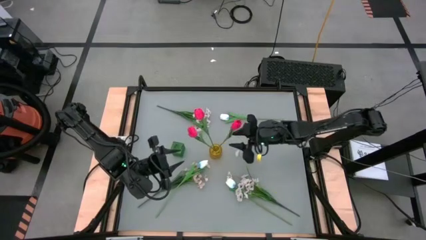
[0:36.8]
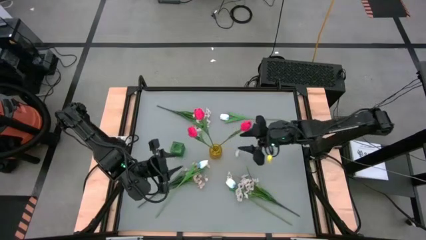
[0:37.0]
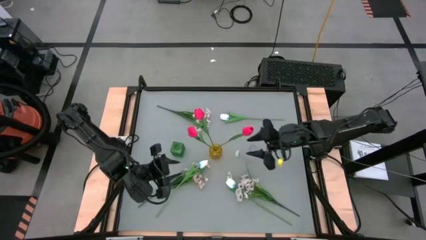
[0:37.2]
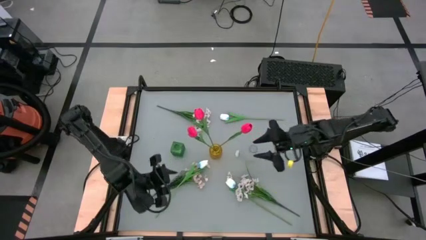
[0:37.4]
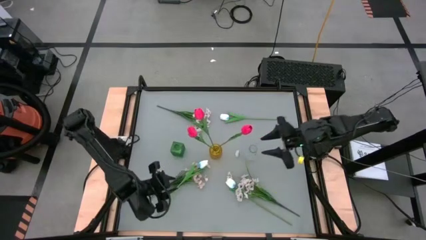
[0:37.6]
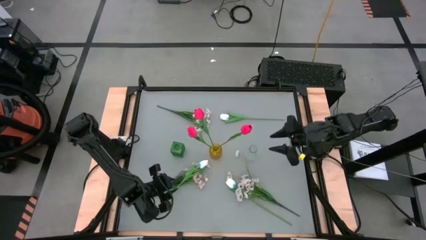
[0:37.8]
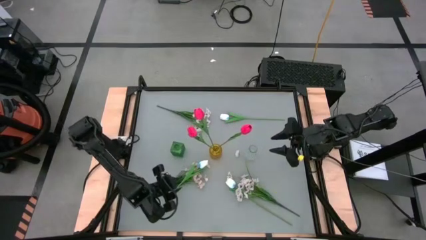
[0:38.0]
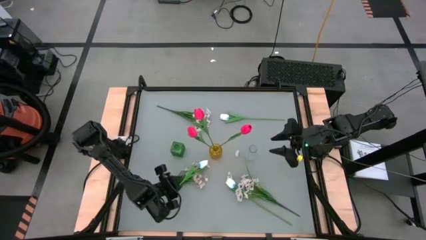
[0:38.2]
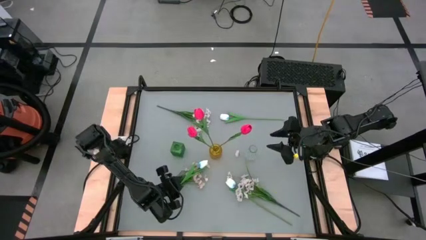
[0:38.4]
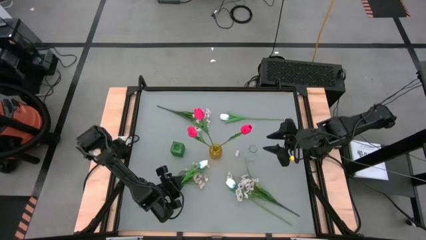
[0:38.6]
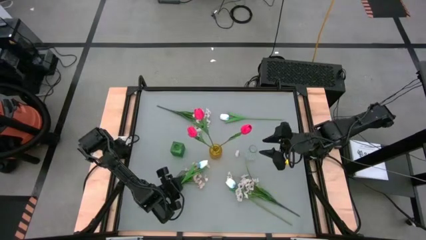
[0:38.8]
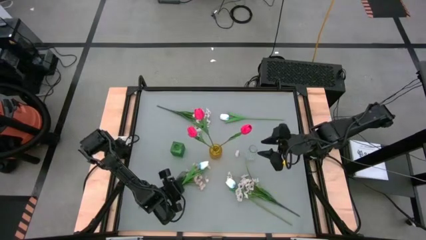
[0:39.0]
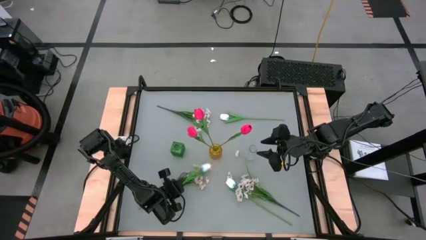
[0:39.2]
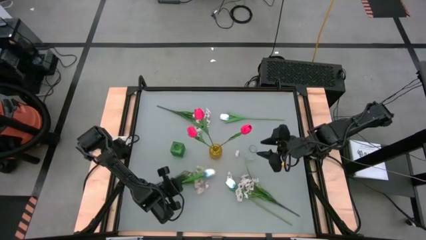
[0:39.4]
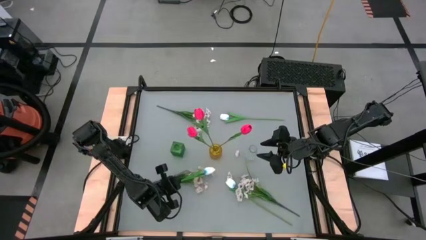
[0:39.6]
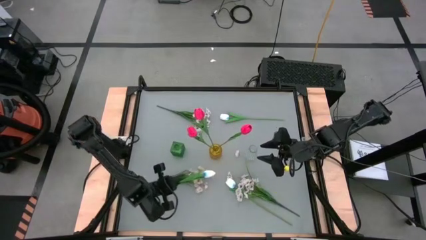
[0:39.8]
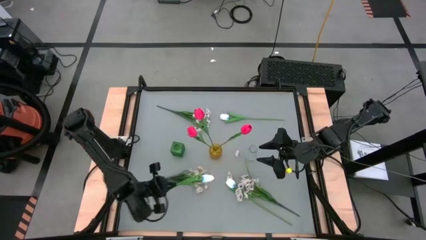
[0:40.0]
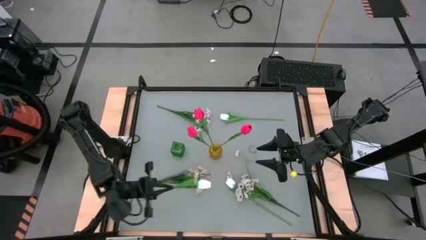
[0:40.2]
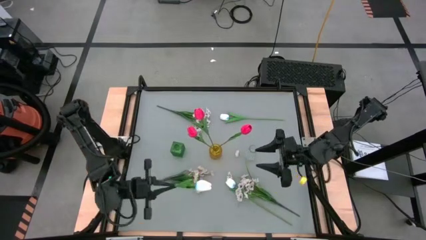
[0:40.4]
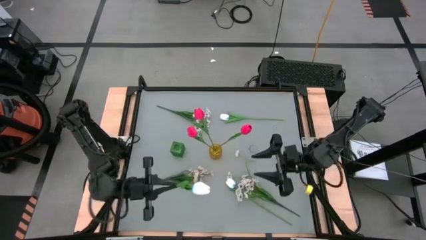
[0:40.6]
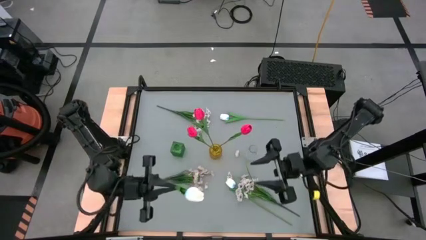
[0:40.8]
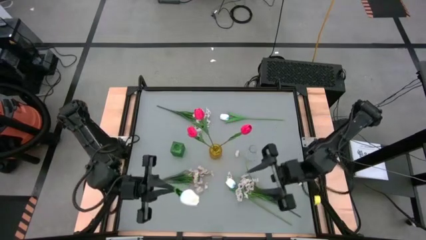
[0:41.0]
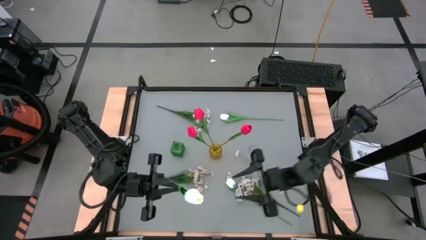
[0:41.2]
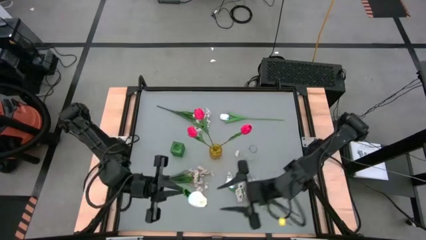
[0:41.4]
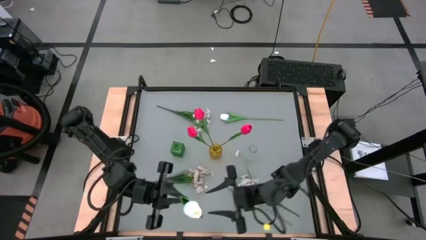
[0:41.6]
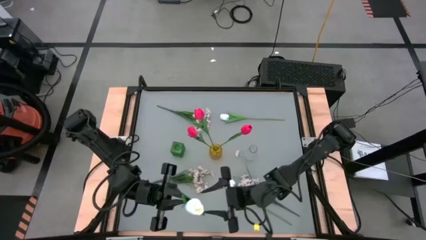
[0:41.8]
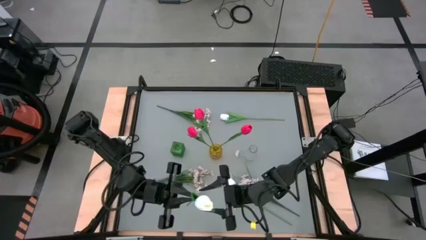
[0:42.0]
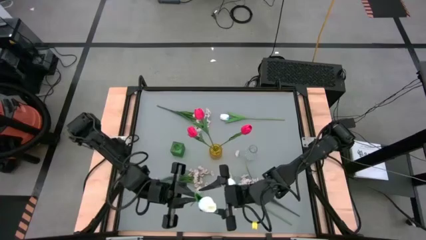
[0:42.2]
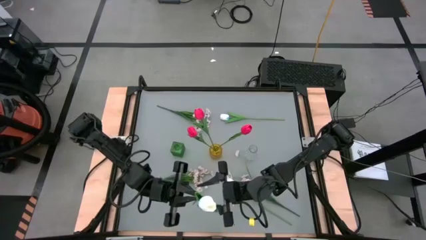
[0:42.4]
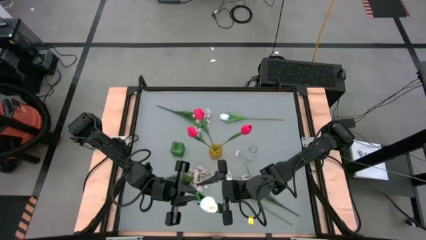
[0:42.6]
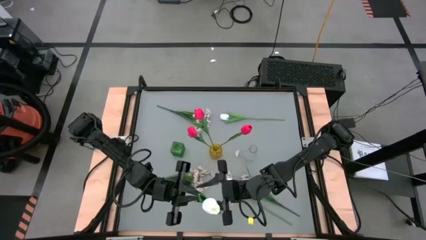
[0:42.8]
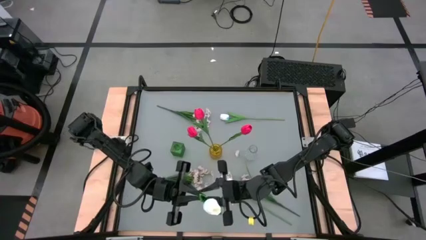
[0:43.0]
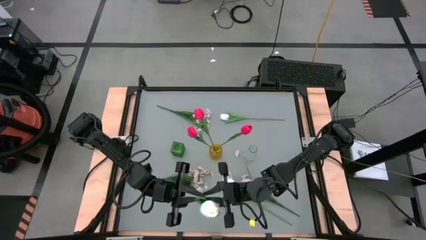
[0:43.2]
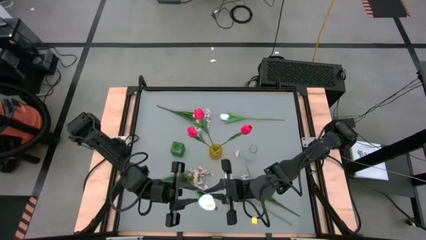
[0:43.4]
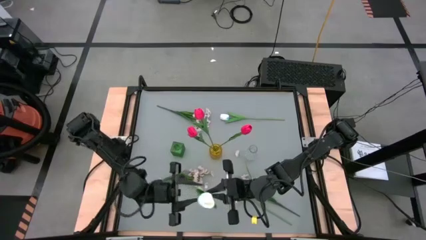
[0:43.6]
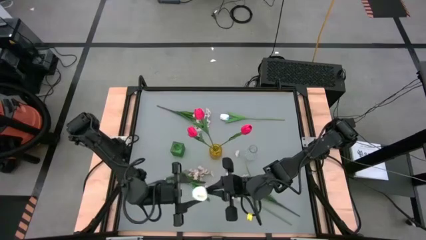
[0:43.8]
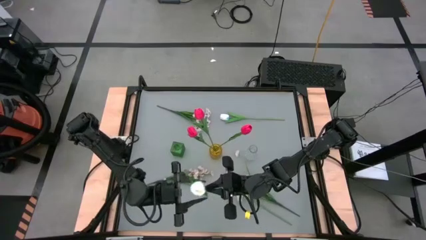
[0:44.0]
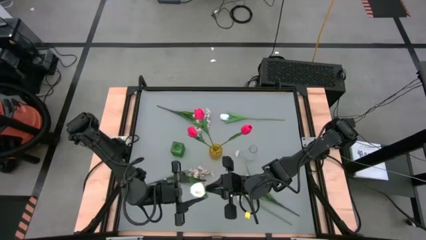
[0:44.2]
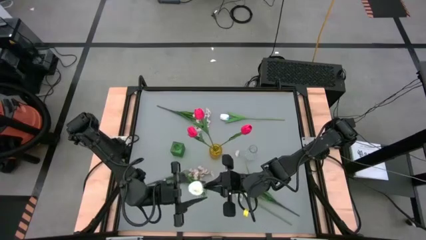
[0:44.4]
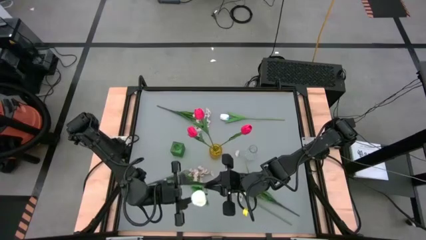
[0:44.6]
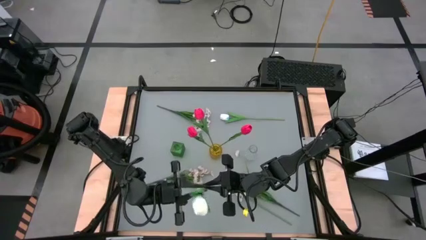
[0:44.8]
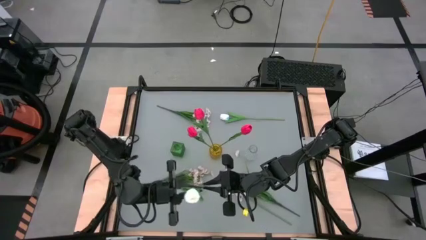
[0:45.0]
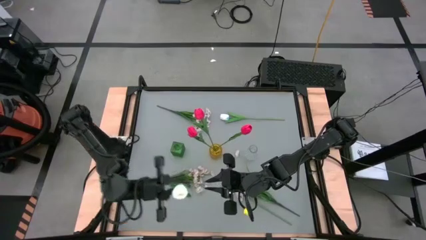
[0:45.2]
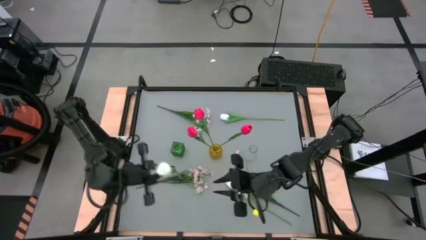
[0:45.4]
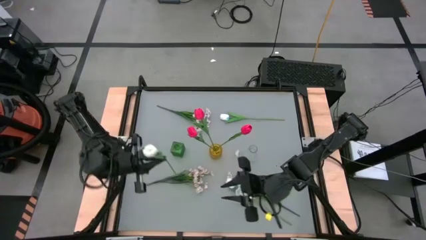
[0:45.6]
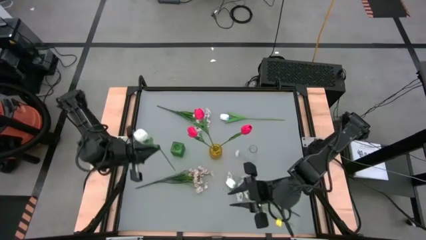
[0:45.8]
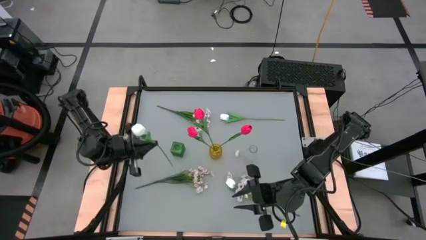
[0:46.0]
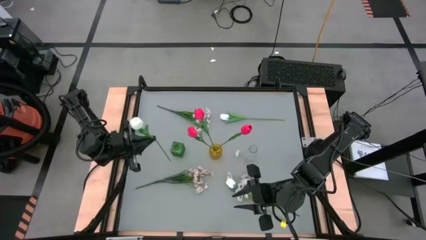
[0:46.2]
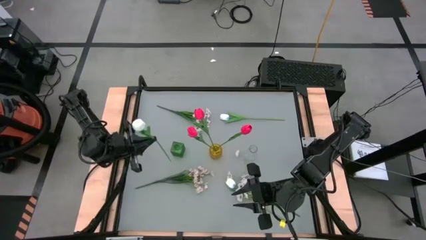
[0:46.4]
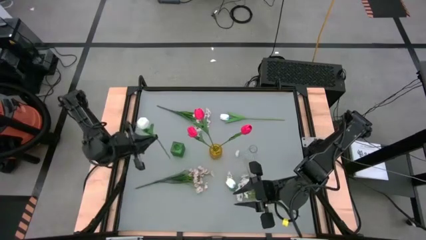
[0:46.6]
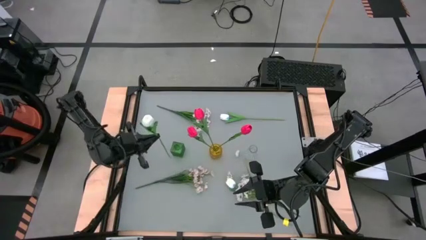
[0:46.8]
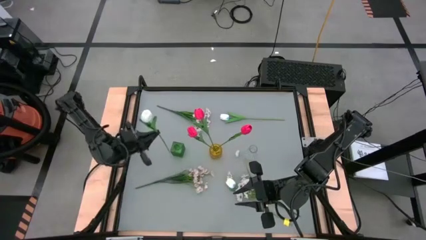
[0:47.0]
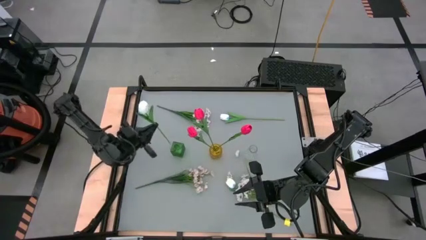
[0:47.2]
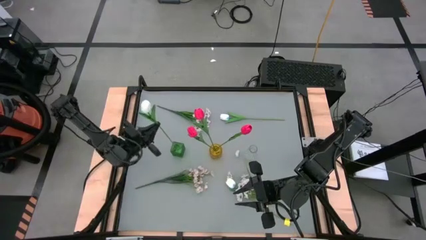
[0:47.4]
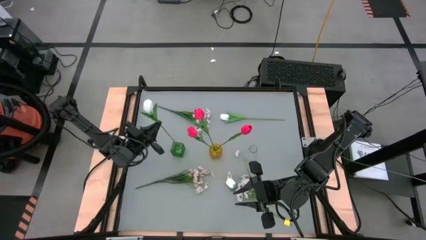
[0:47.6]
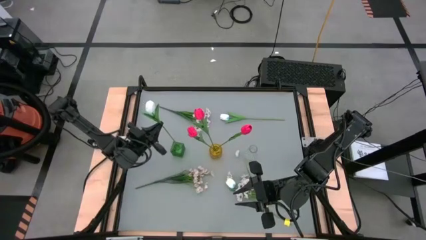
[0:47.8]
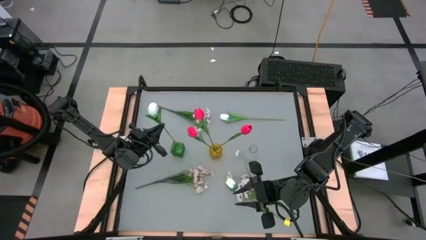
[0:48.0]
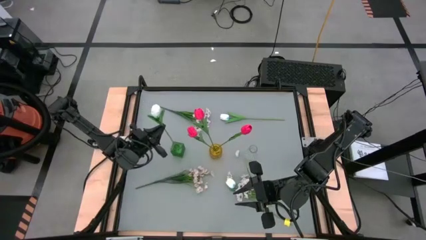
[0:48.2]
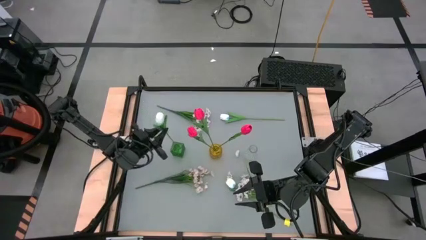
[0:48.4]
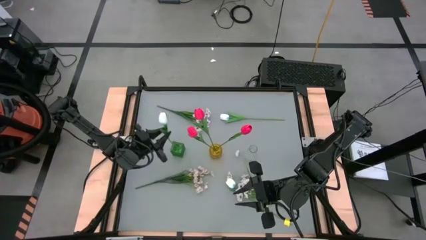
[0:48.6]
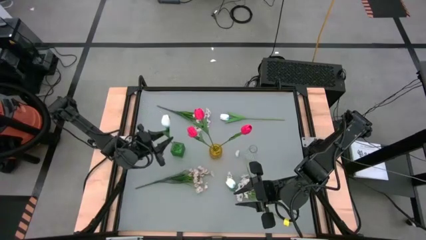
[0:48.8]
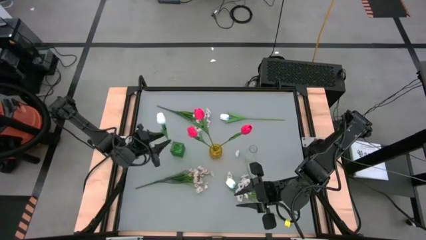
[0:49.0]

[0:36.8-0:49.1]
Task: Sort flowers into vase by color
Put the bottom left white flower into the green flower vase

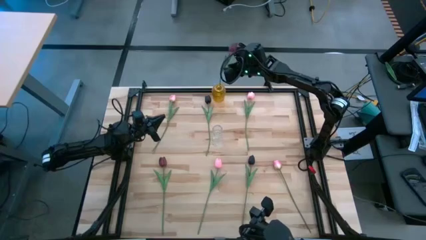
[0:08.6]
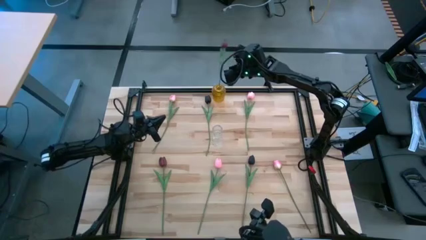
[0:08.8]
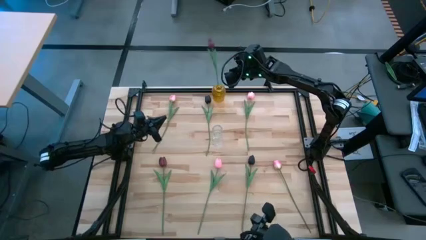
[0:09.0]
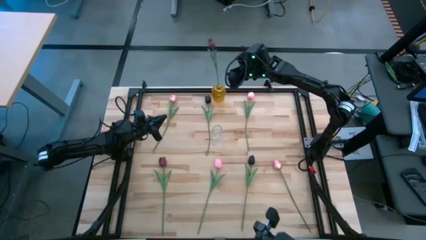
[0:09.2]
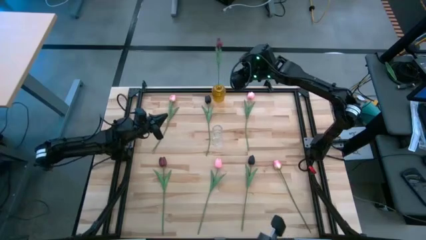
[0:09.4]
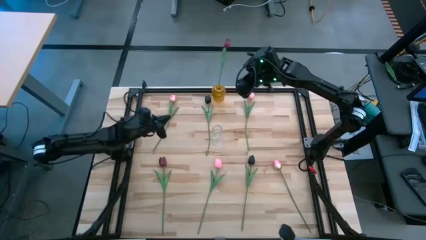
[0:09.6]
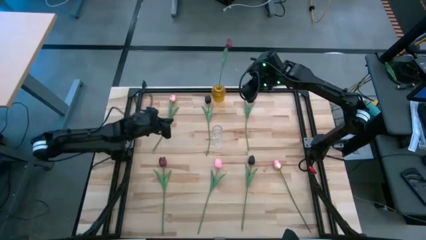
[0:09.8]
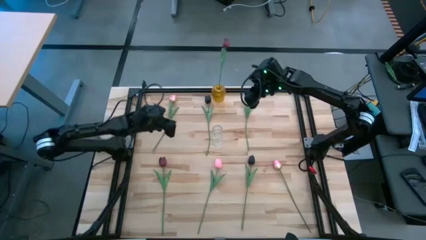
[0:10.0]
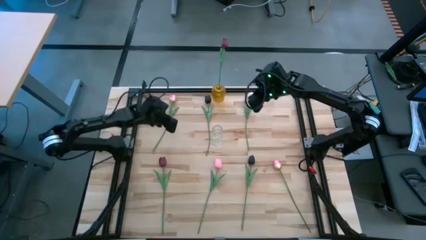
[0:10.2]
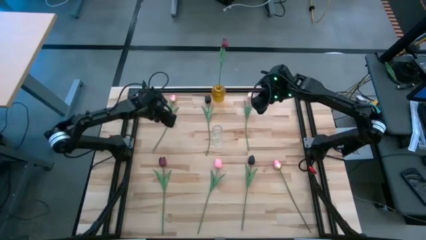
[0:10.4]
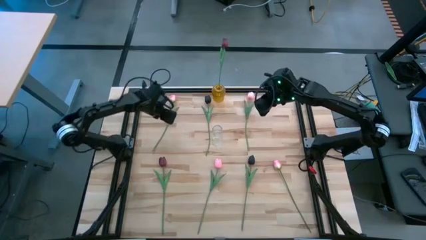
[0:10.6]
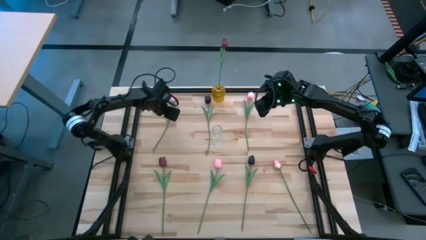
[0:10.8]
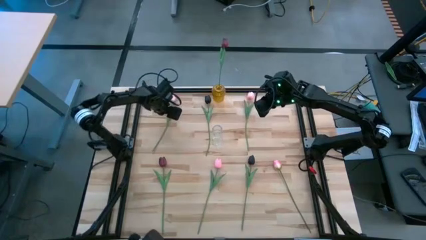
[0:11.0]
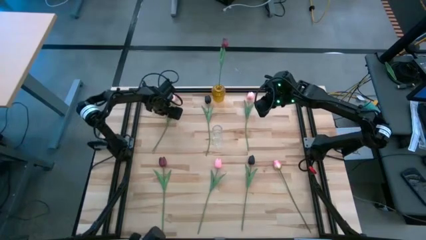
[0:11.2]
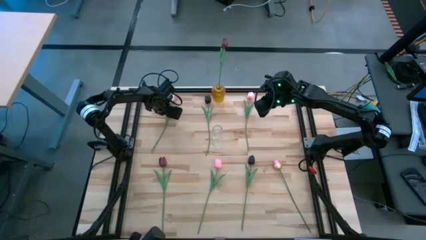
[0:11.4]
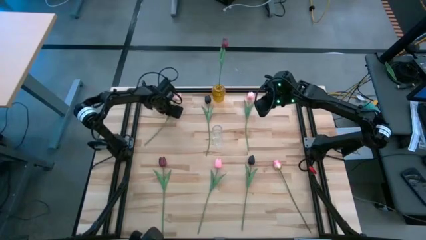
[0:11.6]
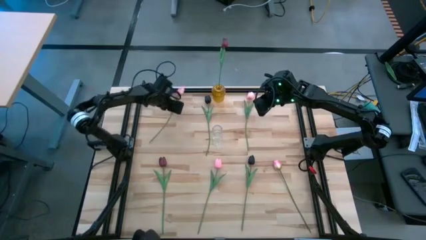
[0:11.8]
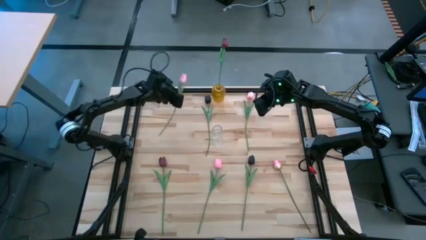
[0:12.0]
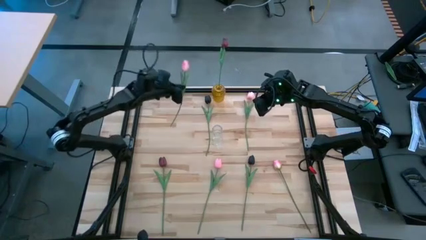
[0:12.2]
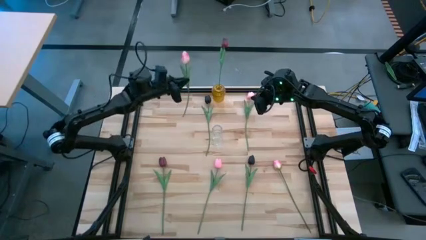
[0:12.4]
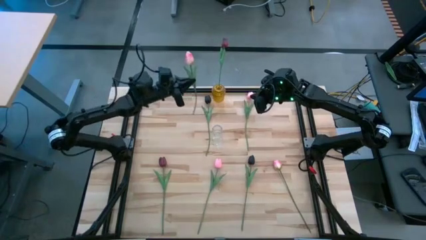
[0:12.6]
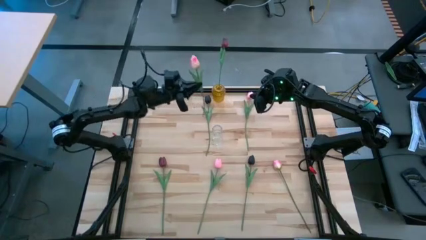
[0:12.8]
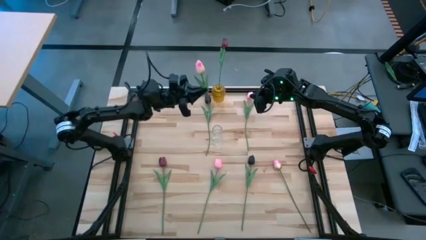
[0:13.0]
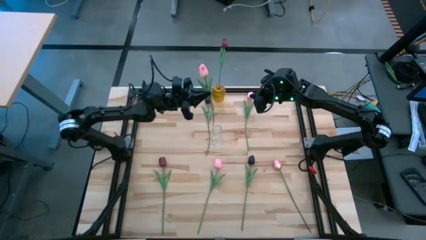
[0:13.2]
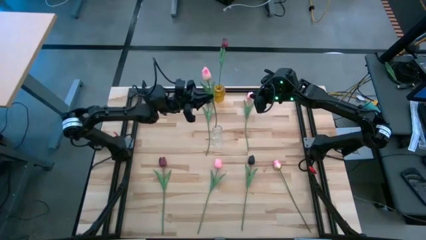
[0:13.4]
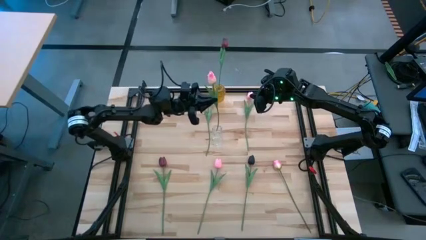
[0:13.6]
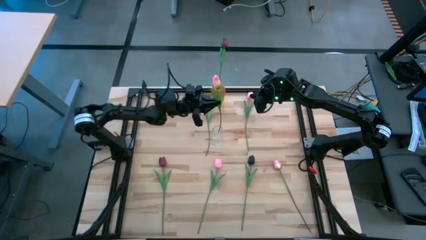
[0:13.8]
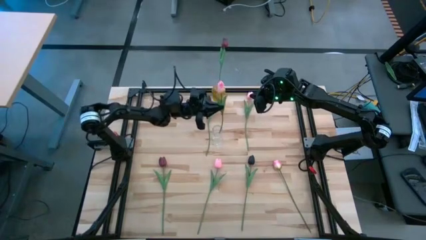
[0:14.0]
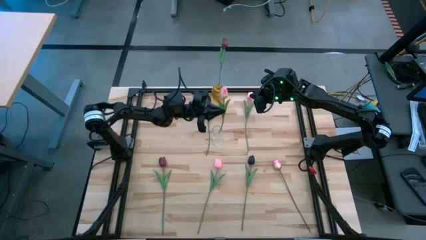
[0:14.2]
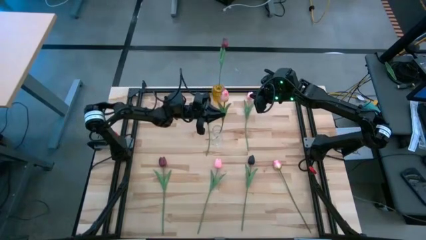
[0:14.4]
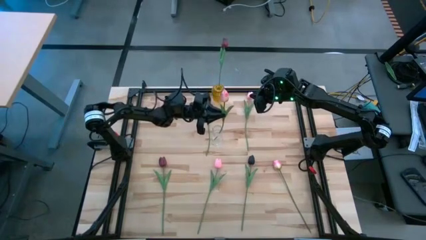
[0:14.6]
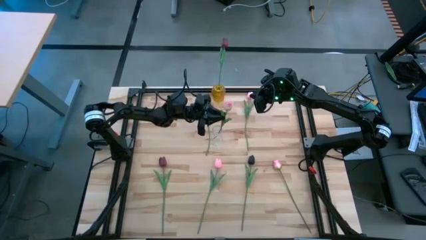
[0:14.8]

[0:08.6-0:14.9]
Task: Sort flowers into vase by color
Put the pink flower into the transparent vase
